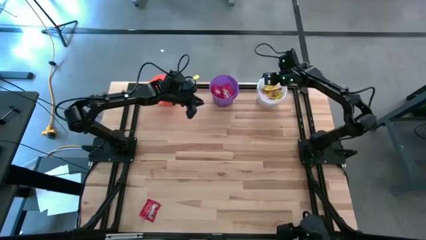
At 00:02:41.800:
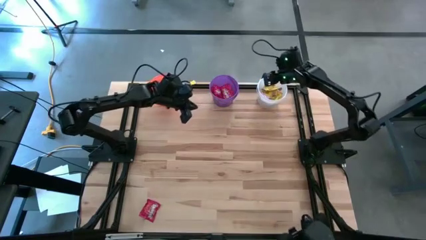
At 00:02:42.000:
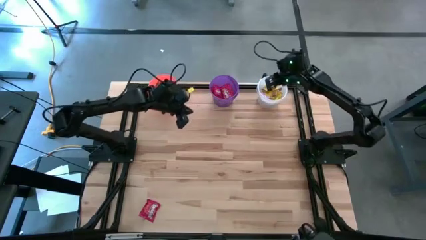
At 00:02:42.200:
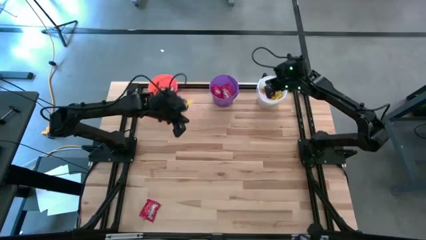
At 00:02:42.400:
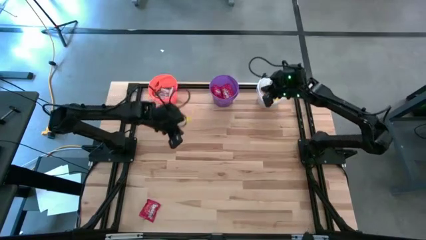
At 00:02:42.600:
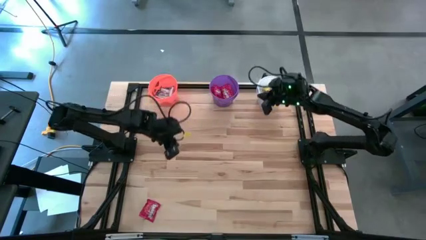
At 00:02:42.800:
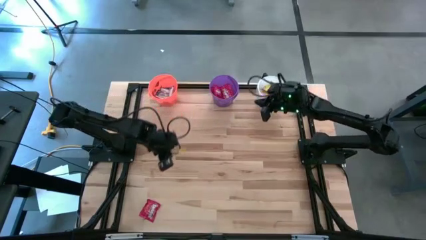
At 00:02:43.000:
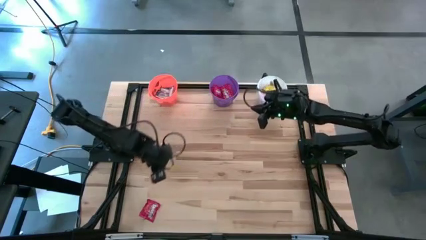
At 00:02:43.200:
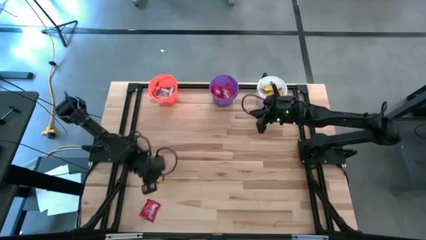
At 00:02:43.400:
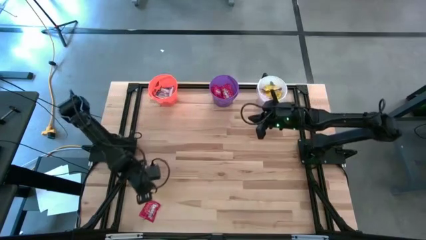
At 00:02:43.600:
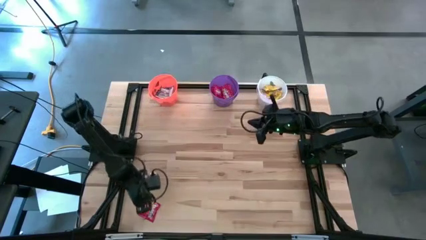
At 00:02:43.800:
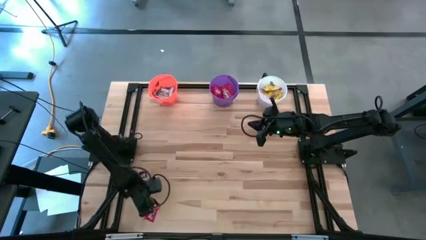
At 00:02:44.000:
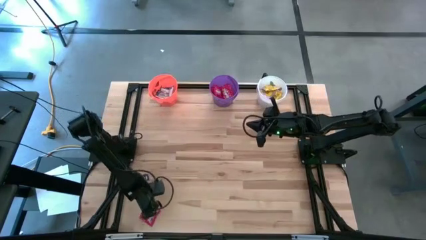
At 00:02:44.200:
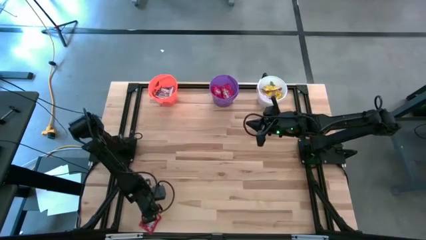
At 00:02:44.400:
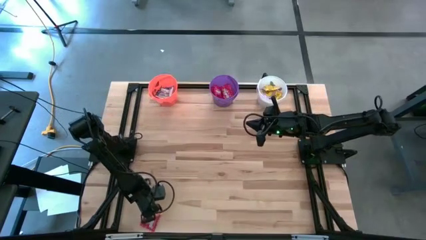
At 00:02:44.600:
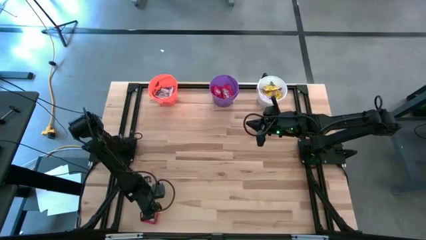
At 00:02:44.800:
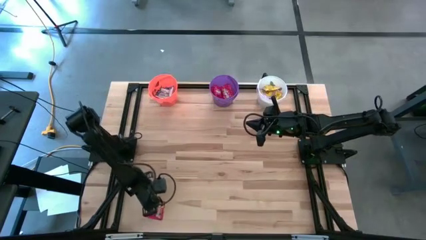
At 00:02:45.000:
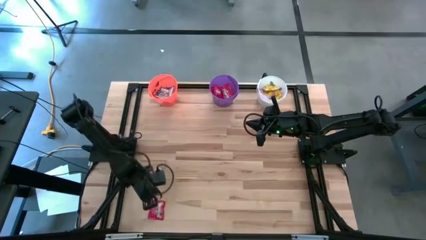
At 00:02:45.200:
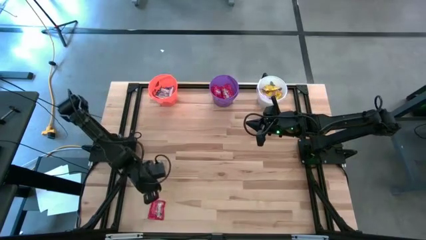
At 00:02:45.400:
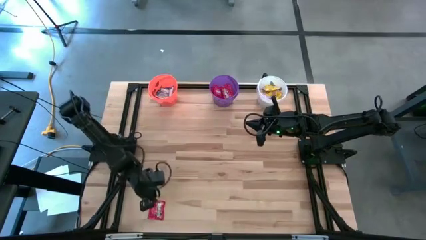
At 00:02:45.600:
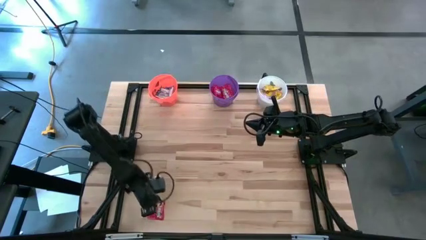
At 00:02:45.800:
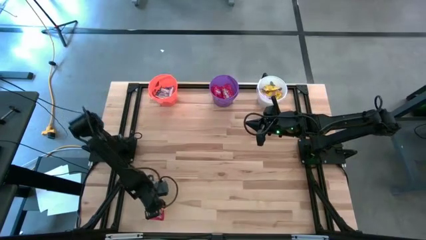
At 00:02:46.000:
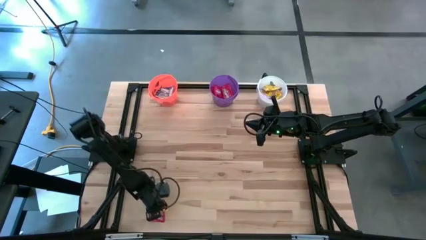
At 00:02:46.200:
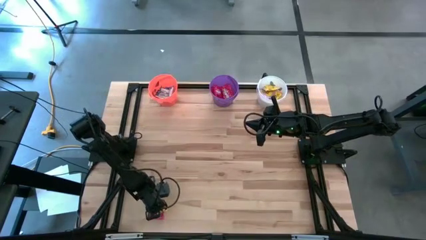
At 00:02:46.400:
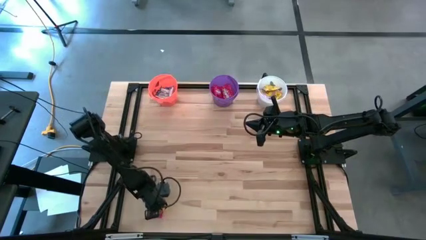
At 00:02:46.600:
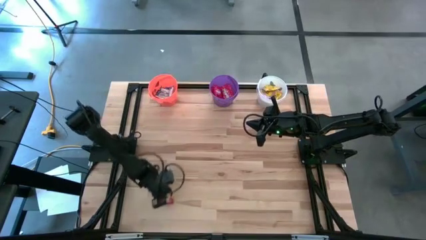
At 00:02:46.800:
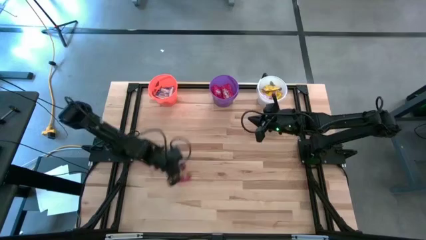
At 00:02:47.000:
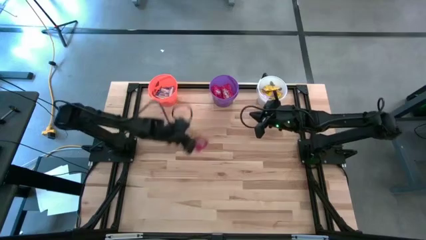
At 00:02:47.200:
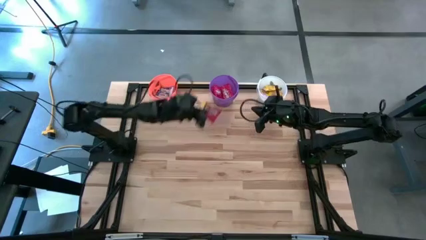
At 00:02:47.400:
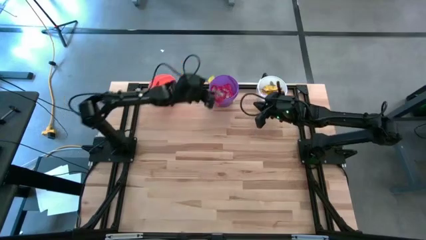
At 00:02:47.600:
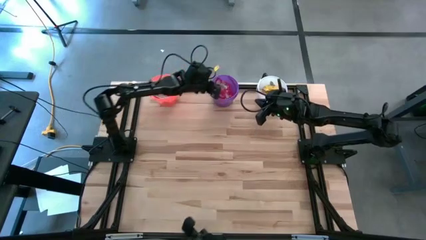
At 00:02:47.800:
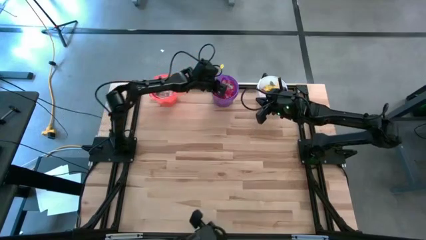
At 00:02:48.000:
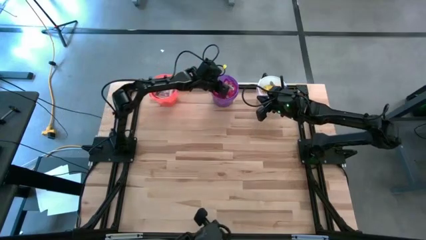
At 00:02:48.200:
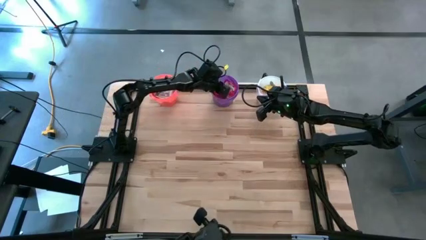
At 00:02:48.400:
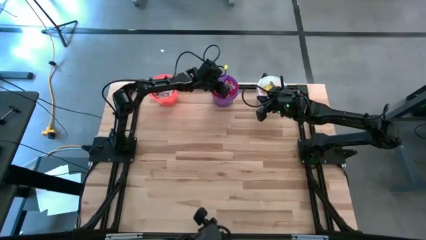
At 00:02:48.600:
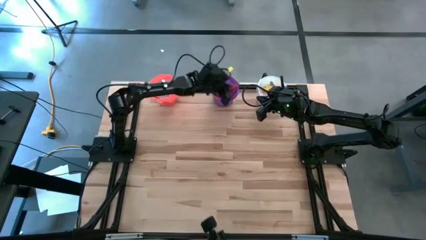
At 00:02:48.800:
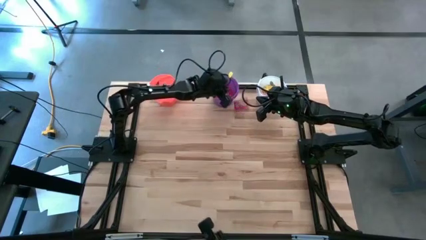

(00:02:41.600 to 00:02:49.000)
Task: Sort candy
Put the red candy into the purple bucket

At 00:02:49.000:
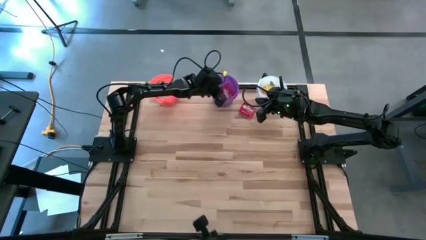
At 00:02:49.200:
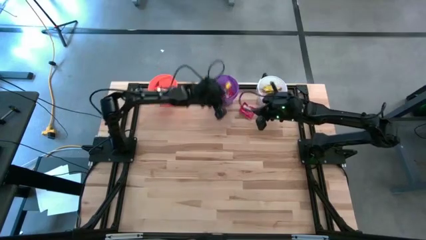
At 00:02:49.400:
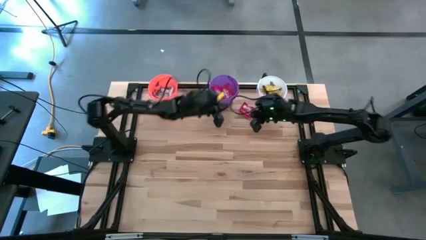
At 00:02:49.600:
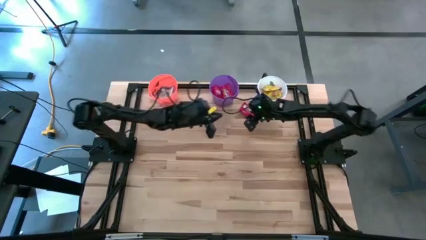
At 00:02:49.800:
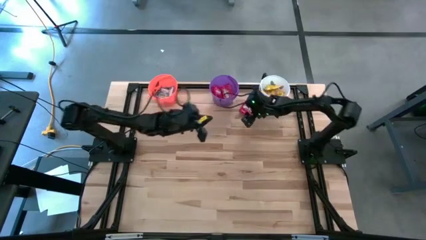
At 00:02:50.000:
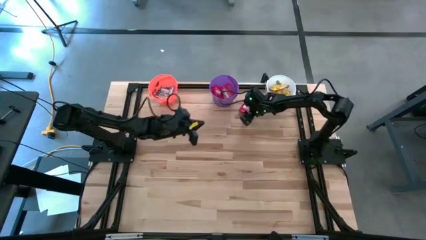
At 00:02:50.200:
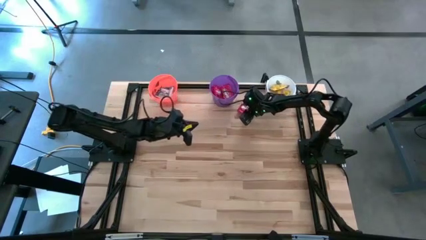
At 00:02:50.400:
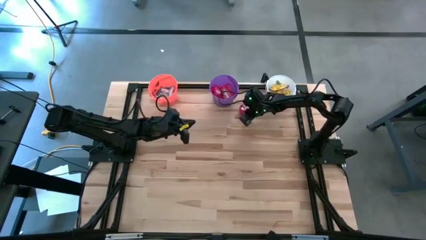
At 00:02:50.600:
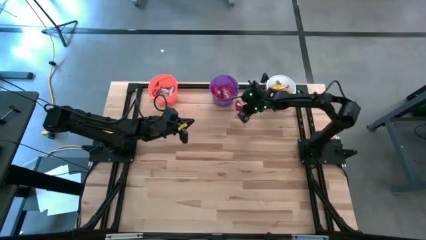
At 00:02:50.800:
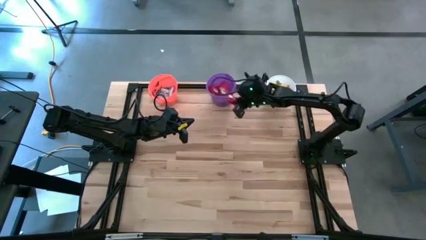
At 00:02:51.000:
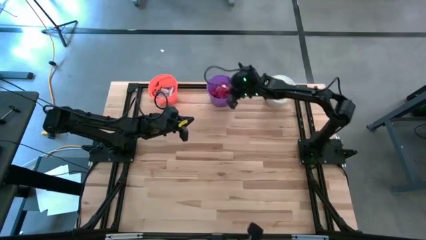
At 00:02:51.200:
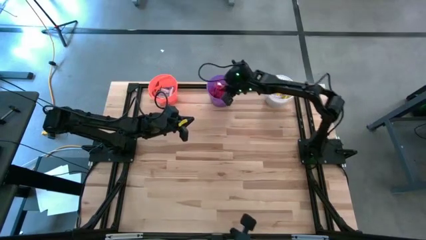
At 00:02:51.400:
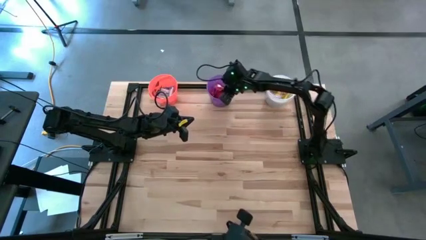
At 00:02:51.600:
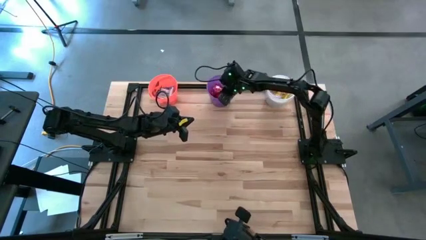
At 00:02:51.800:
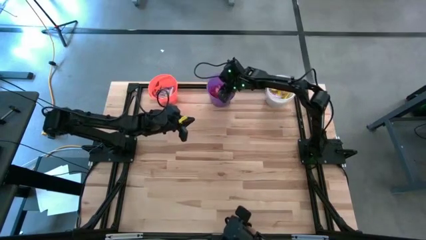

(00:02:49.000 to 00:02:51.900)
Put the red candy into the purple bucket

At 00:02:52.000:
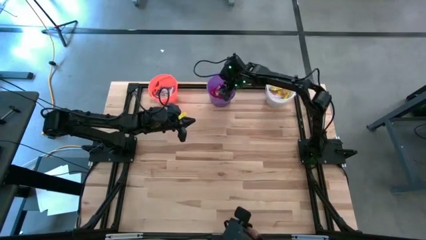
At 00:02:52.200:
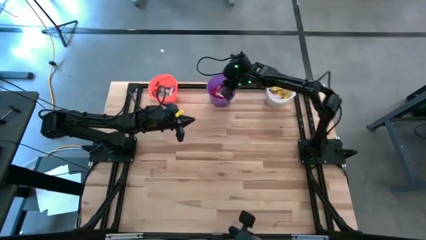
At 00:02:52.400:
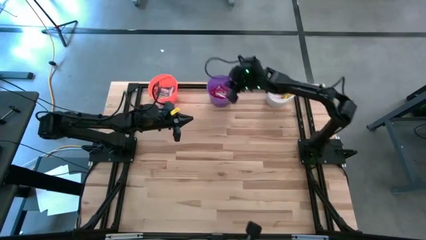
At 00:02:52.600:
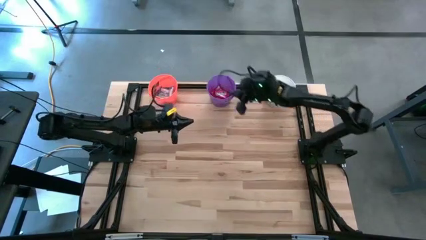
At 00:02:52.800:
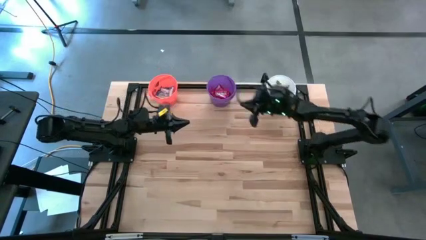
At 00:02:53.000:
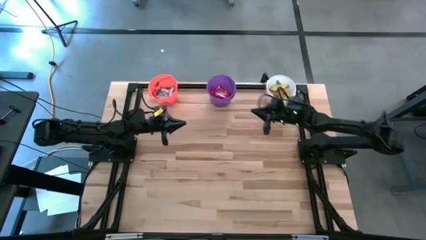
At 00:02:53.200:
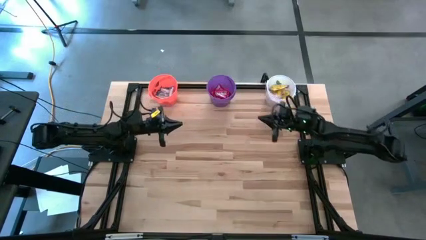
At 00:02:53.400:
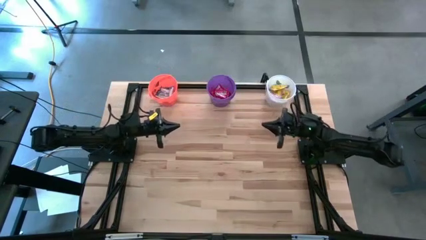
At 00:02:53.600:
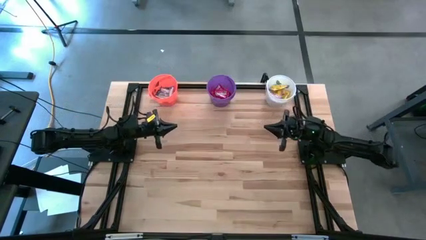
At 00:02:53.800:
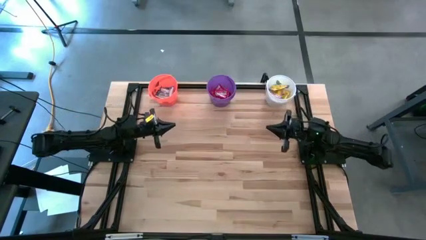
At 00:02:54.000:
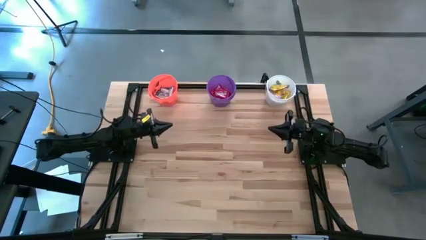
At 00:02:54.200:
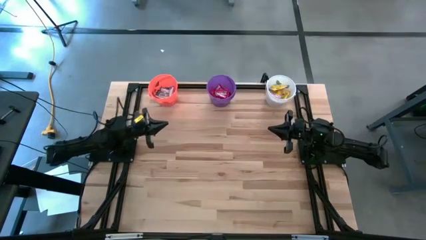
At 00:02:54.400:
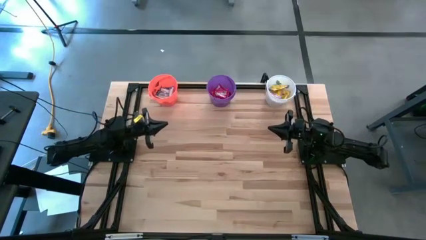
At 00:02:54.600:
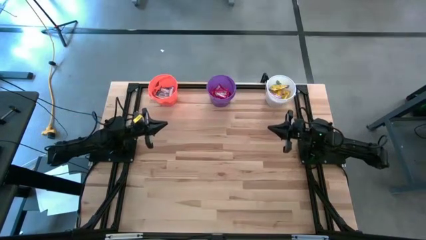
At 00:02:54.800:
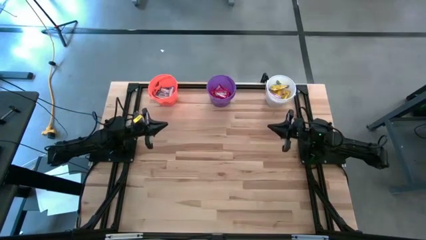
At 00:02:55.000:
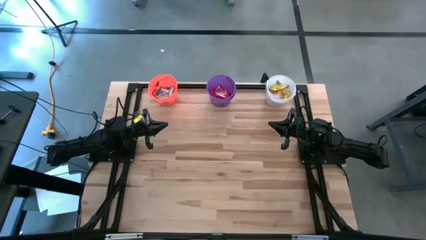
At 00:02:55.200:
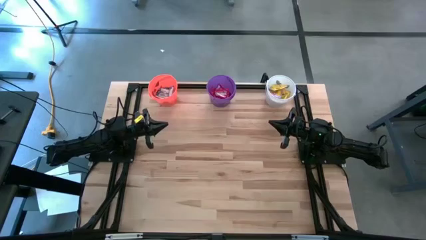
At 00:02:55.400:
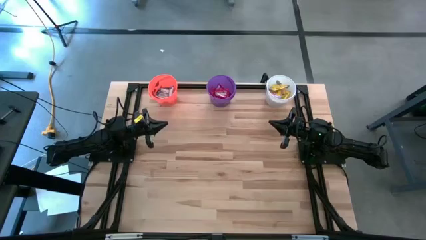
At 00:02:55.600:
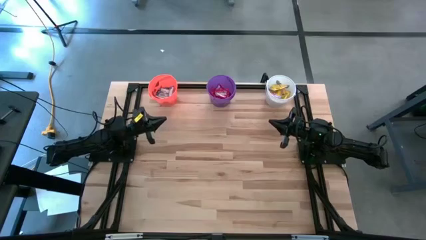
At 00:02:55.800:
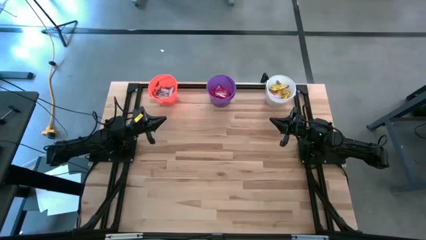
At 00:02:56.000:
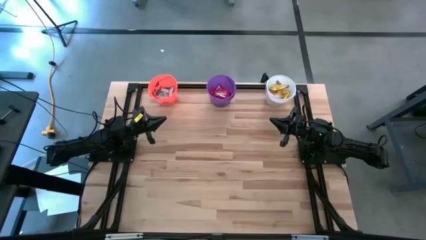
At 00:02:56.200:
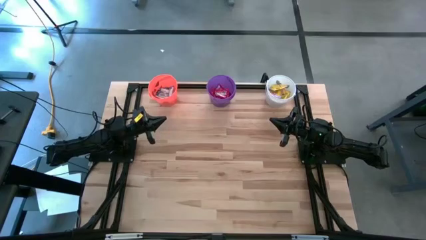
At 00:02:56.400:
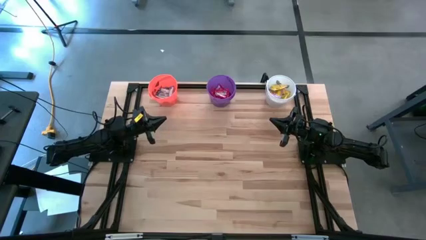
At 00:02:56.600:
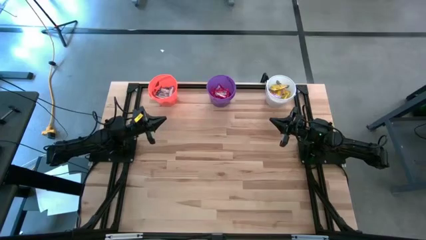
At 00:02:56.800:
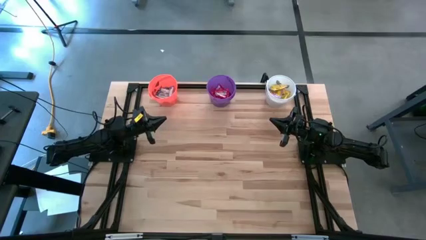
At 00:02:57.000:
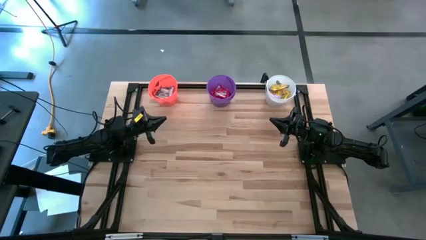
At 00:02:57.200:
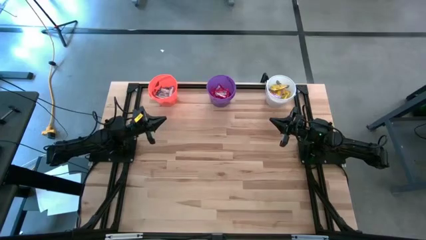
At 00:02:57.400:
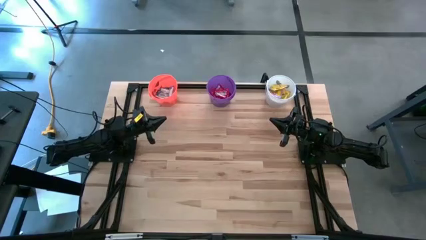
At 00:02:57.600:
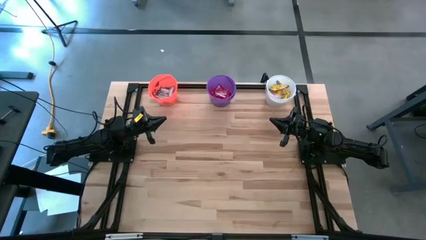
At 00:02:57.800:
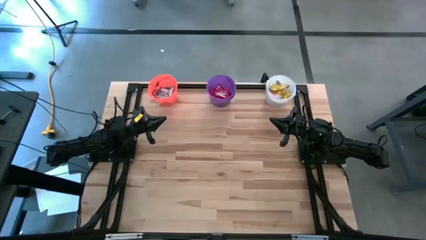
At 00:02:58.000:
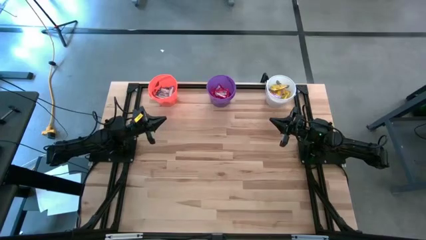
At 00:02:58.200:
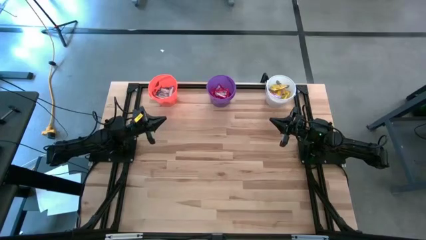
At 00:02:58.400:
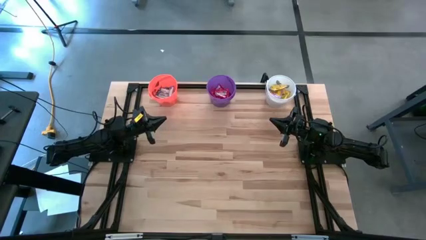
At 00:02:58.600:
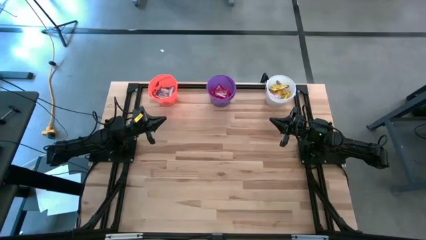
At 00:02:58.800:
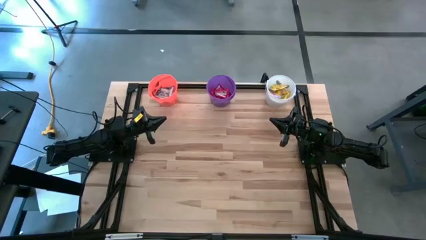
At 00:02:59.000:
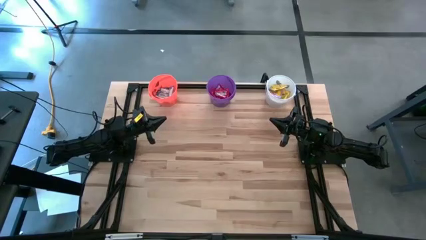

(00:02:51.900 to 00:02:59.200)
Return to Home Position
